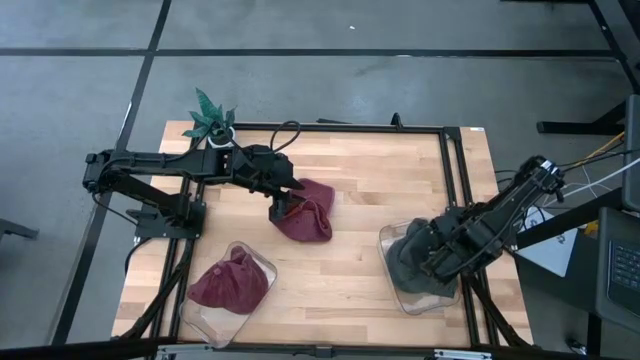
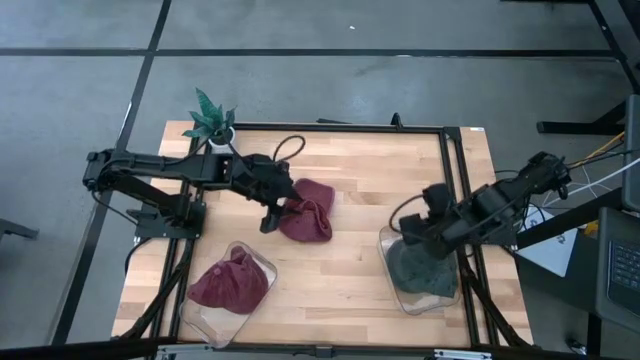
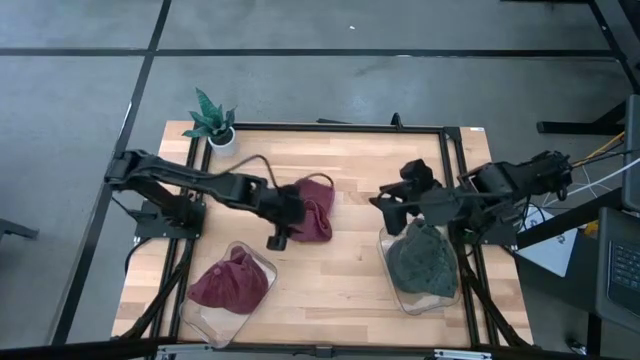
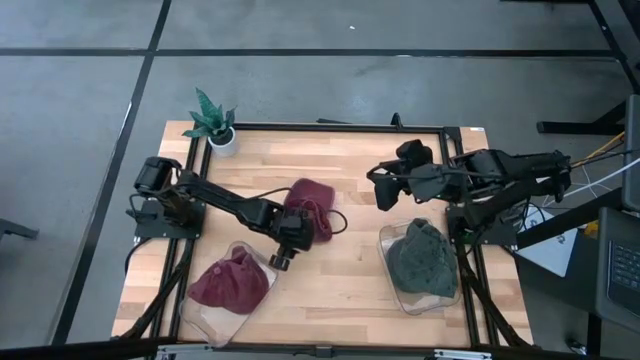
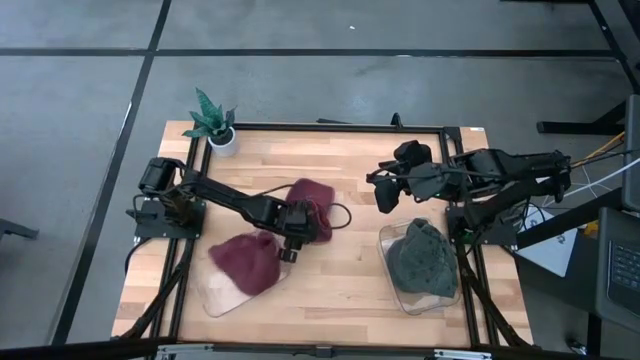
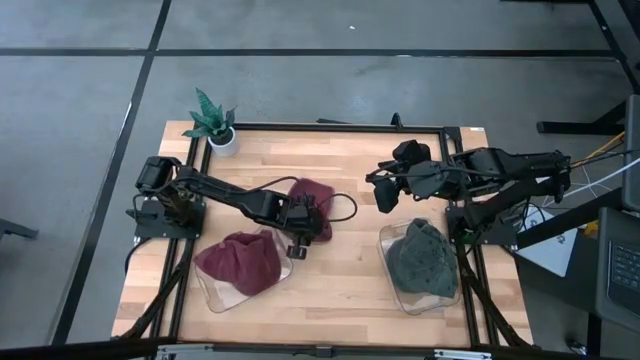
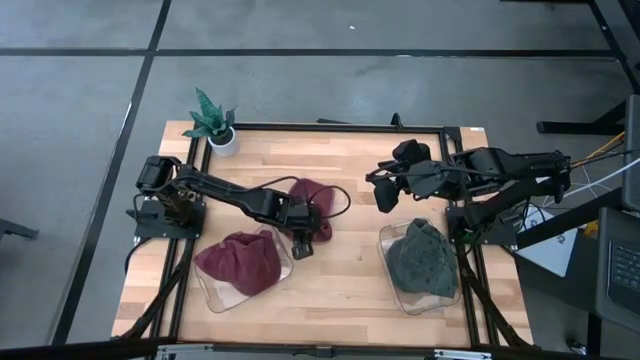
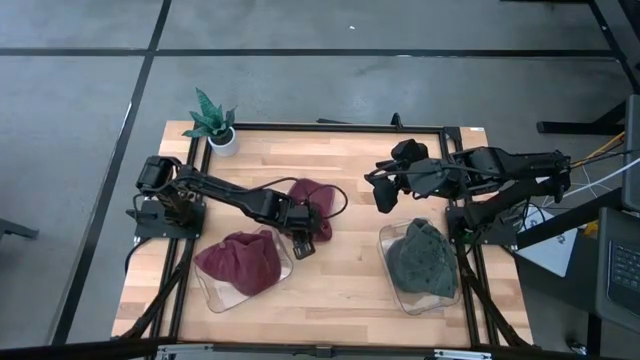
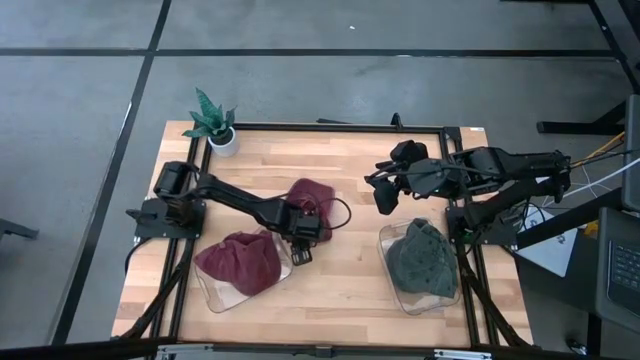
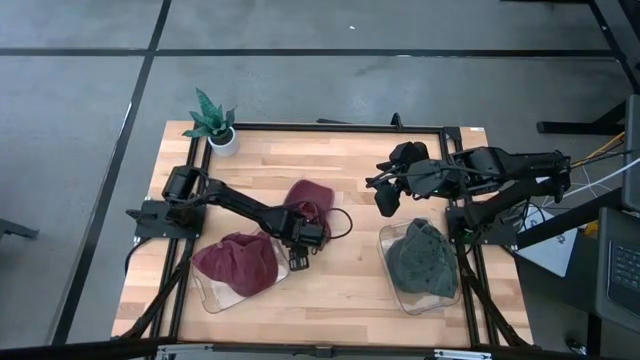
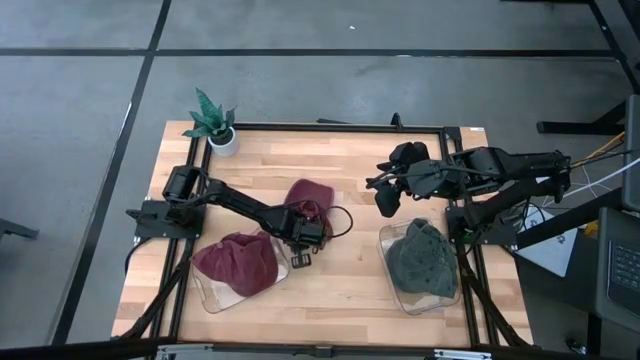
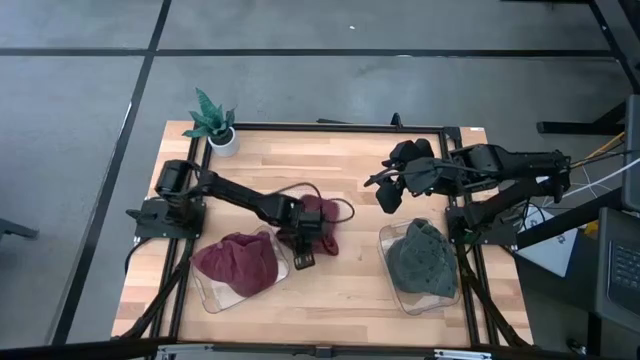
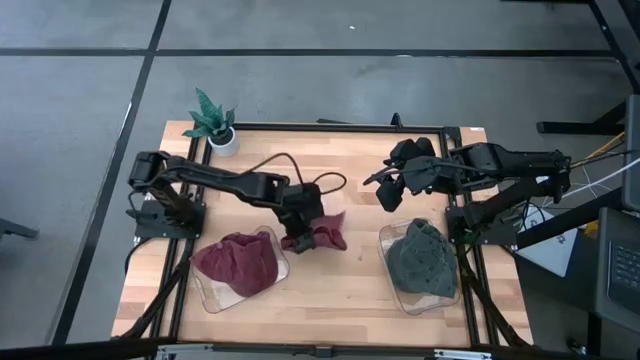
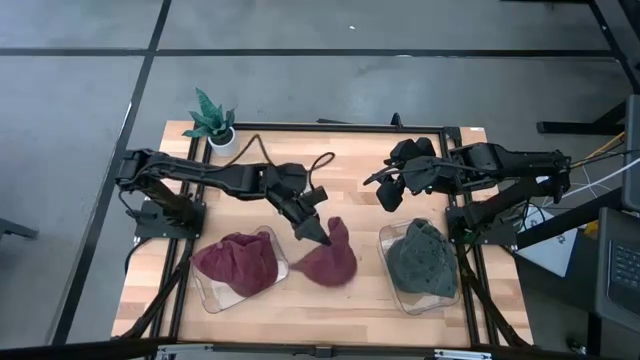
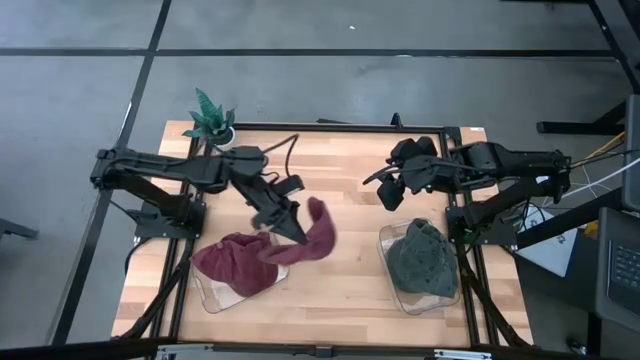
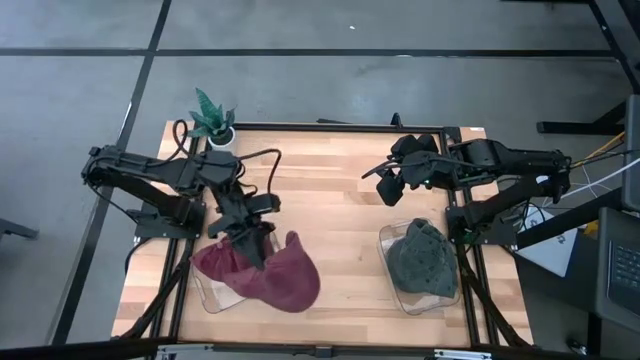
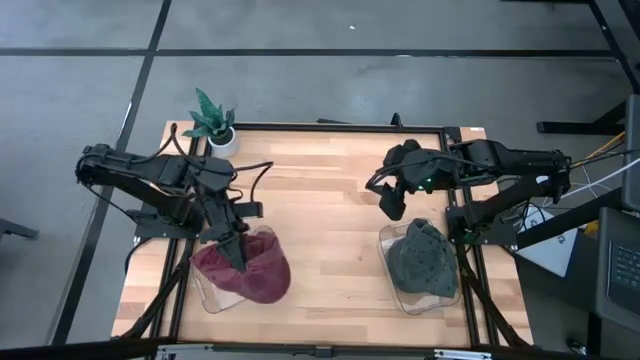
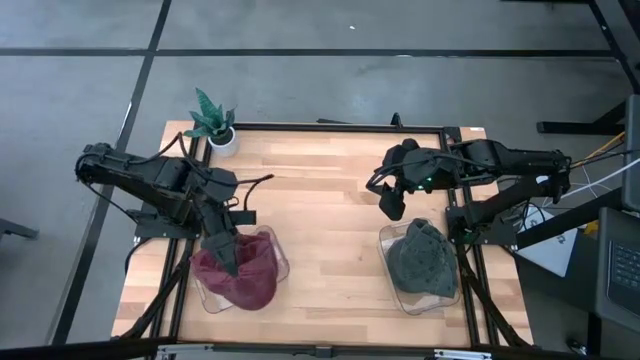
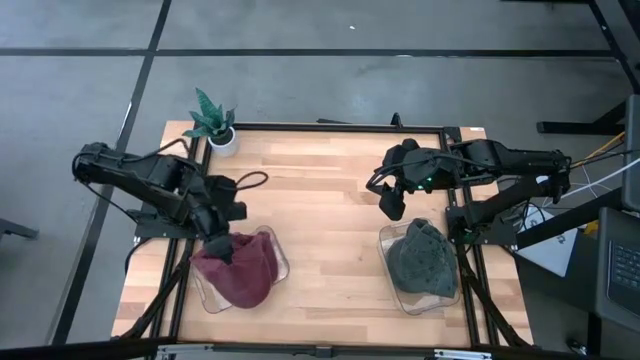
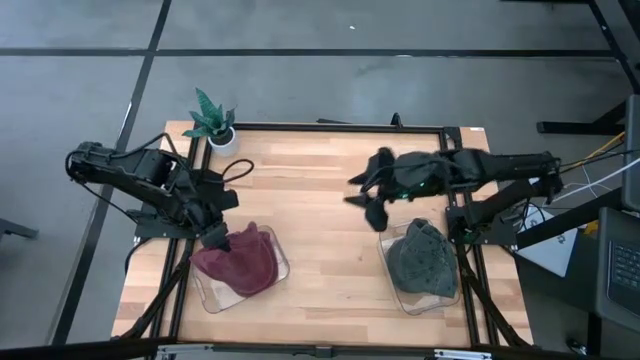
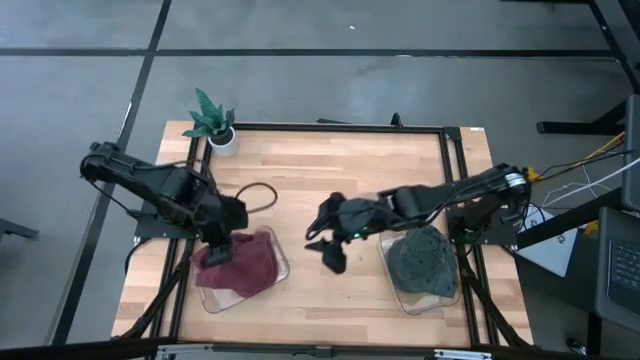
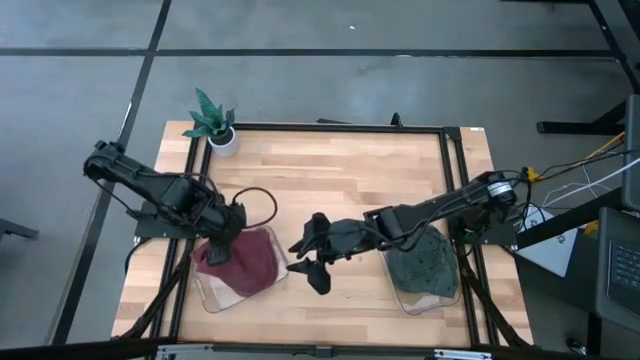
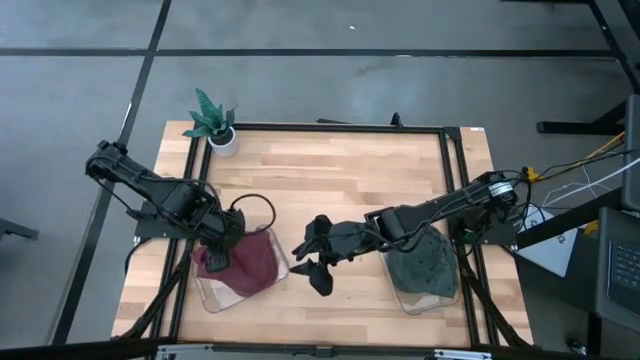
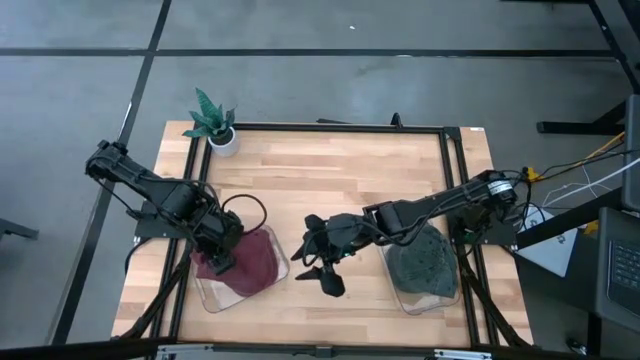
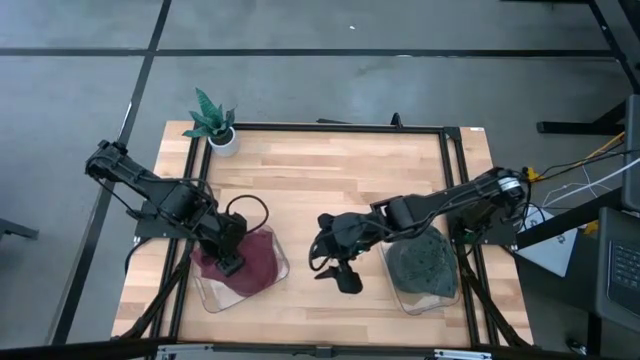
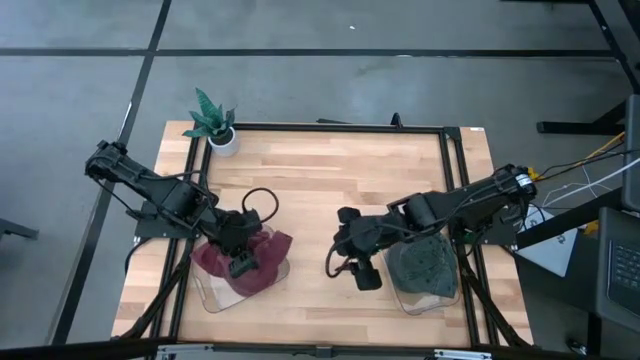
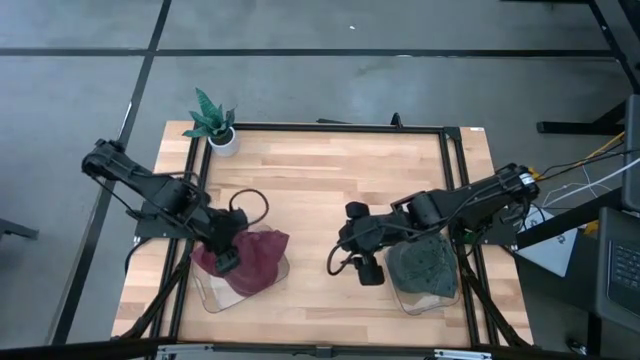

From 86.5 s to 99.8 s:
Task: Pick & Place hat
Put the red cap into the left transparent bin

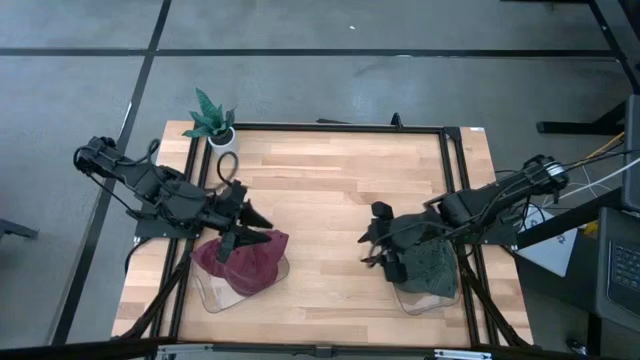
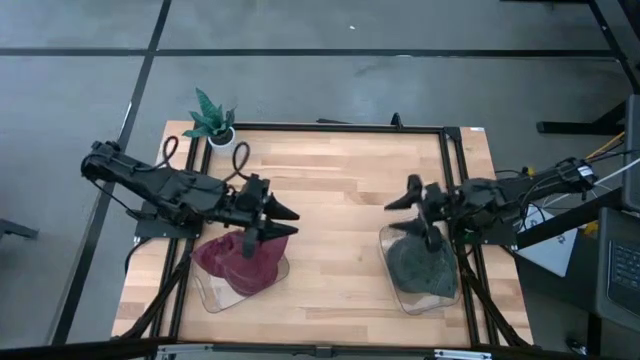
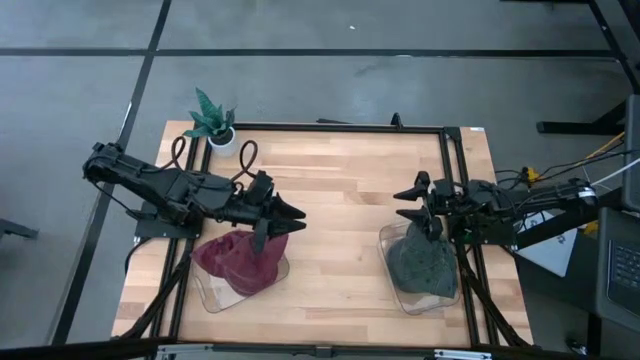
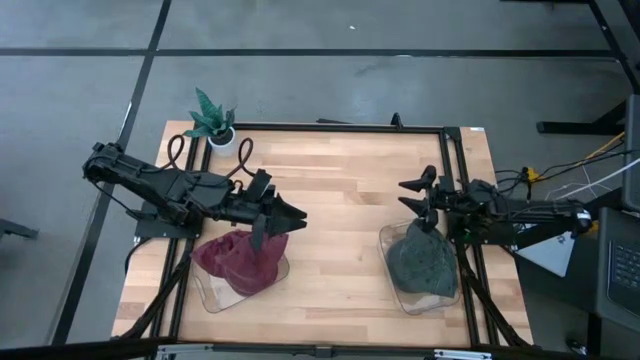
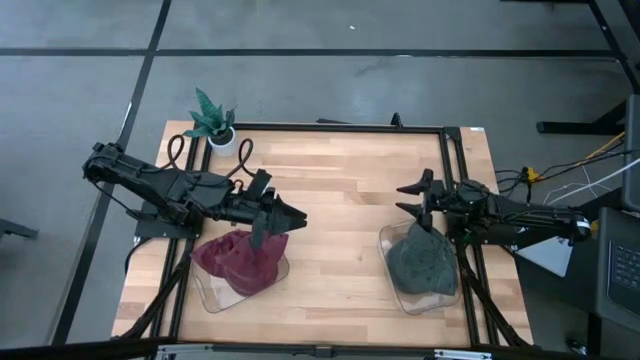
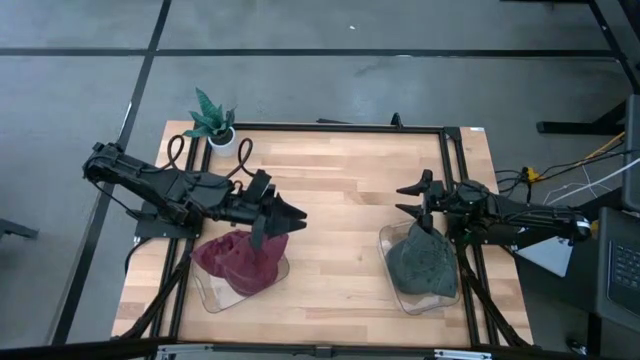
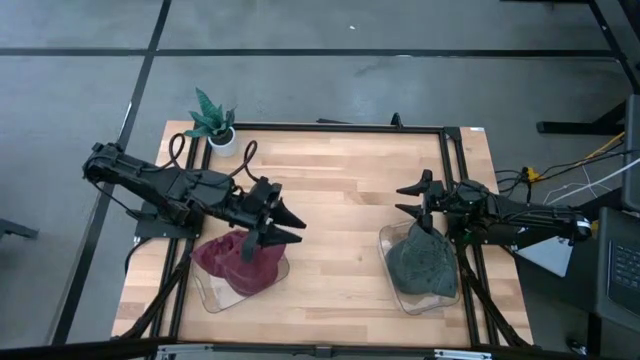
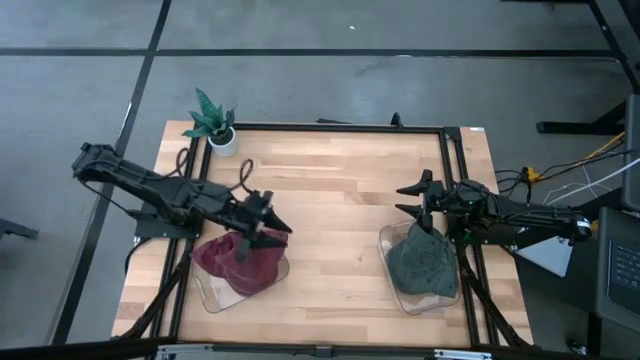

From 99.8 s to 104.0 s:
Return to Home Position

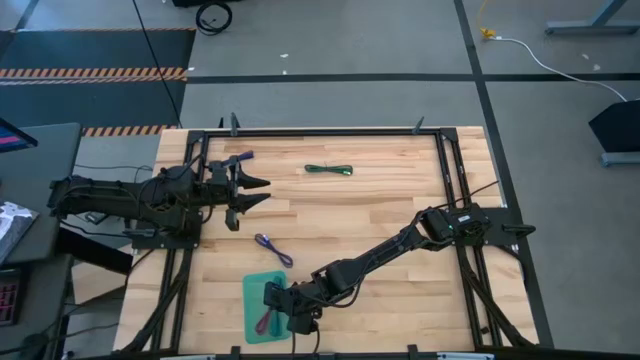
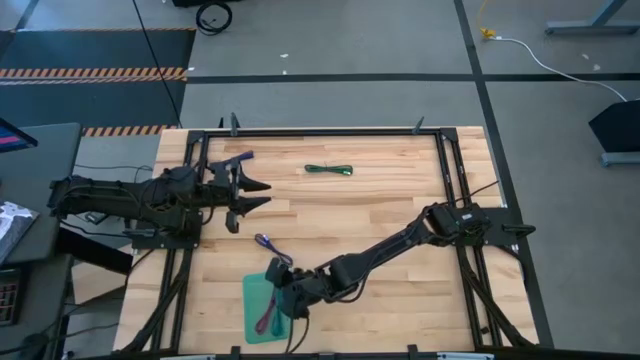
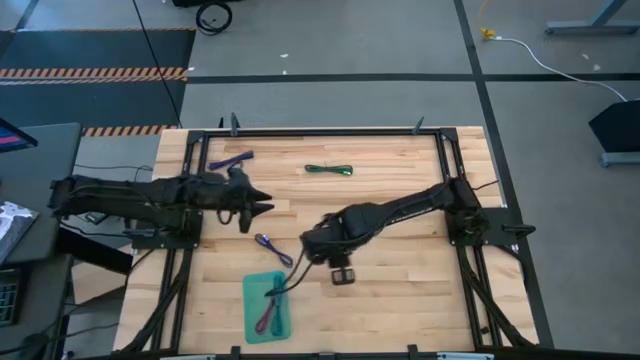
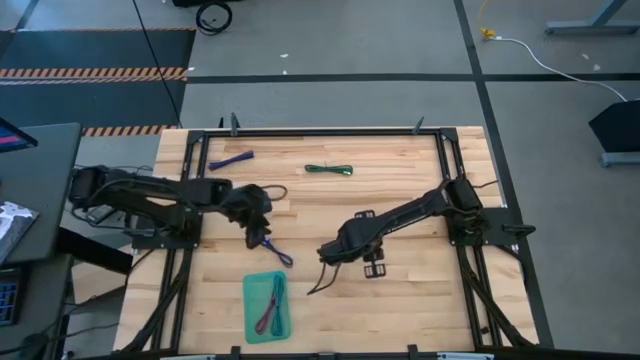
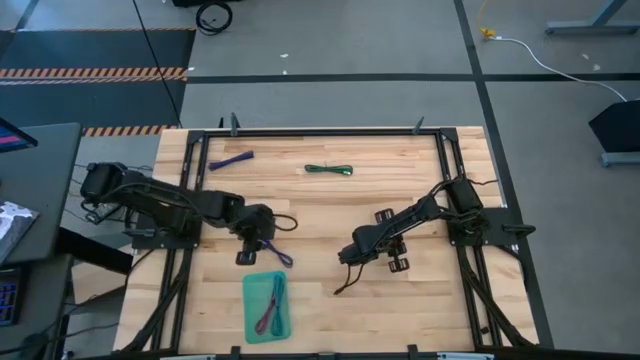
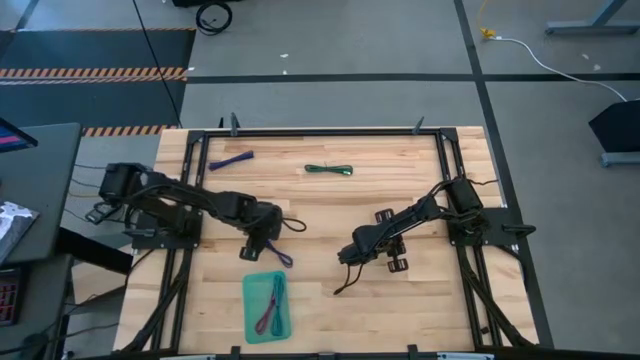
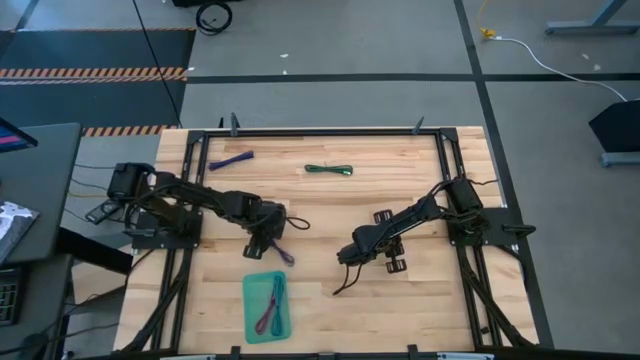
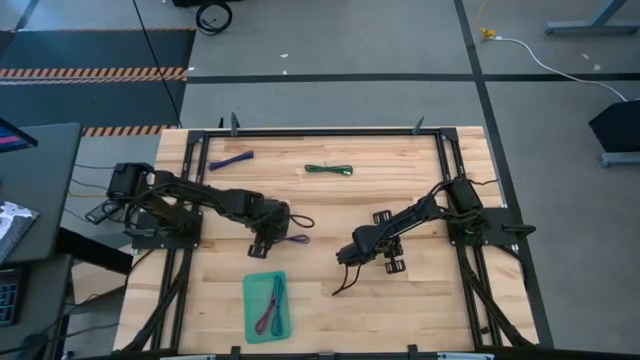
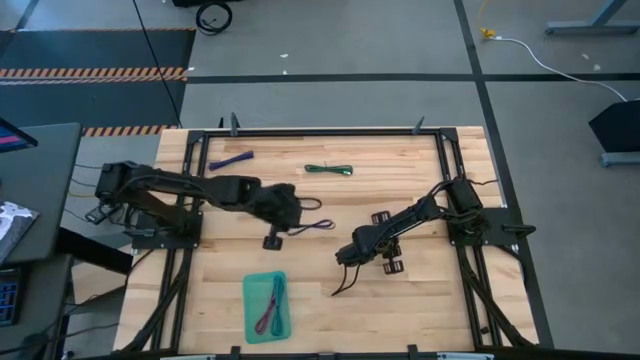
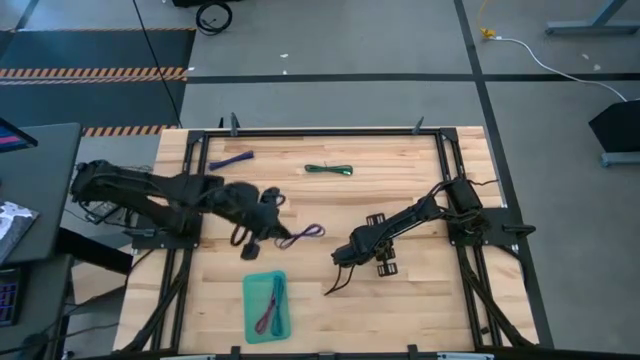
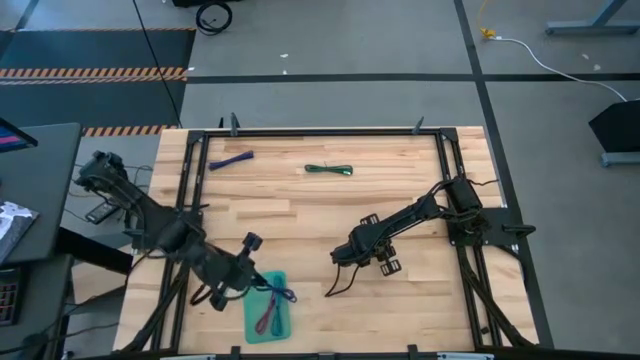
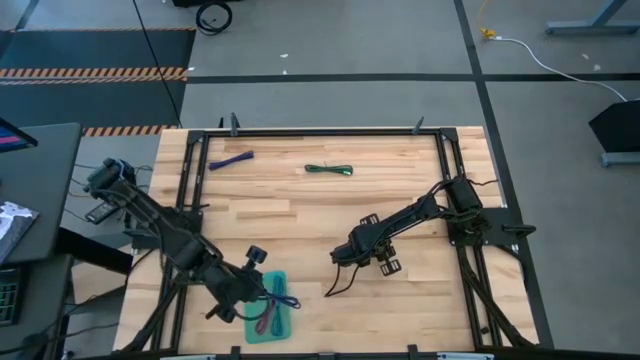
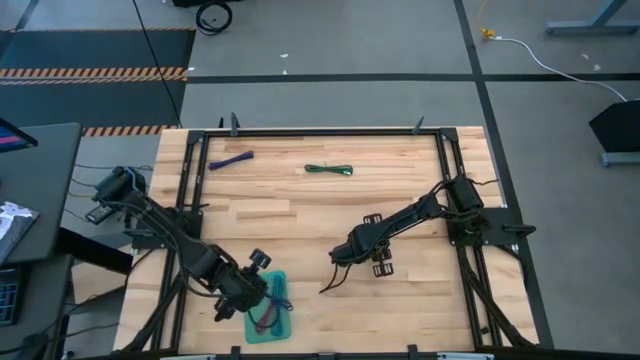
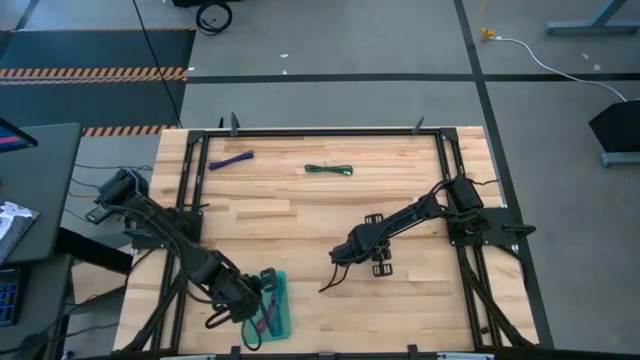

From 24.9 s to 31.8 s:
Task: Pick and place USB-C Cables
Put the bottom purple charger cable into the green bin
